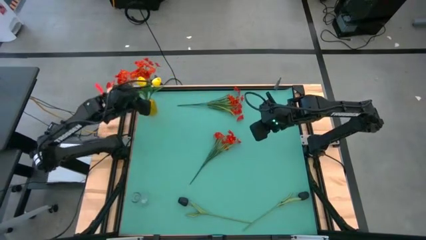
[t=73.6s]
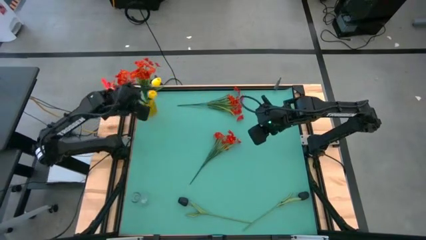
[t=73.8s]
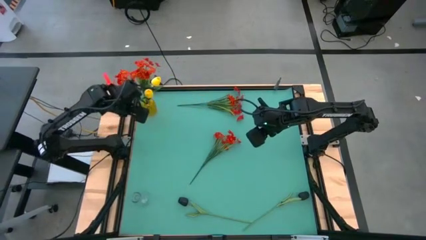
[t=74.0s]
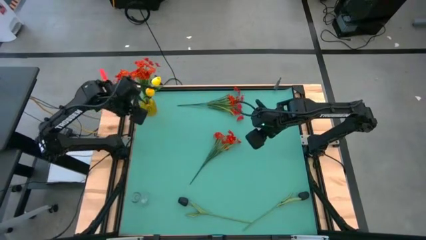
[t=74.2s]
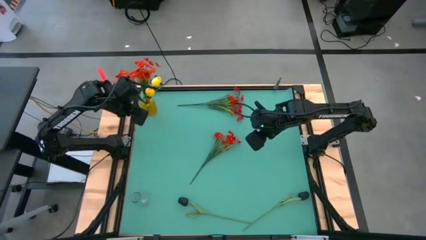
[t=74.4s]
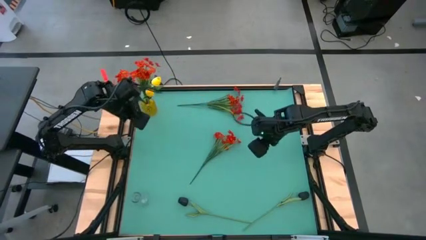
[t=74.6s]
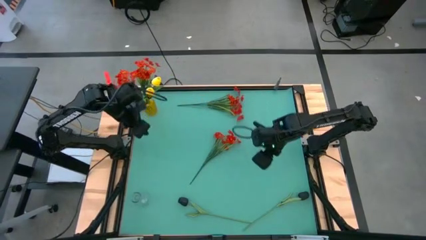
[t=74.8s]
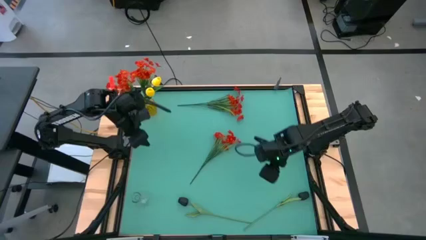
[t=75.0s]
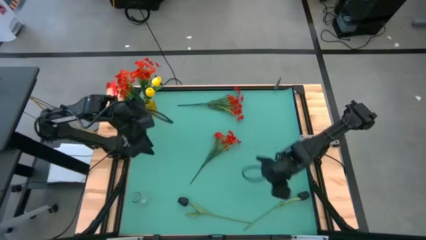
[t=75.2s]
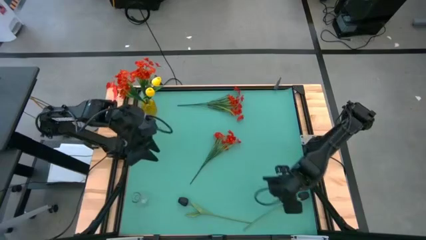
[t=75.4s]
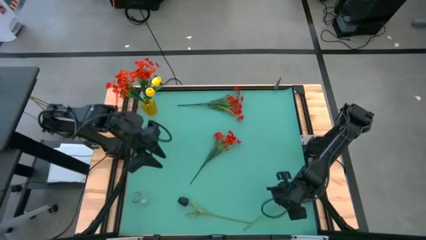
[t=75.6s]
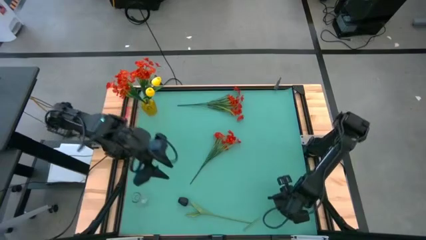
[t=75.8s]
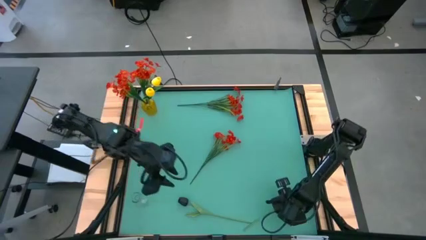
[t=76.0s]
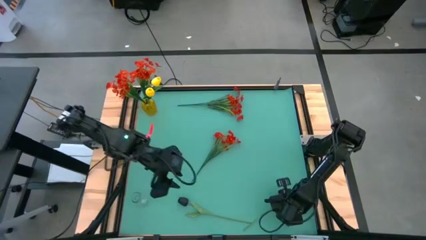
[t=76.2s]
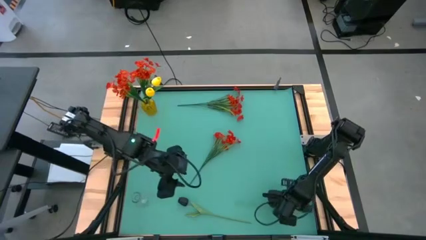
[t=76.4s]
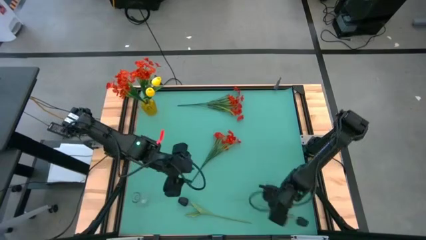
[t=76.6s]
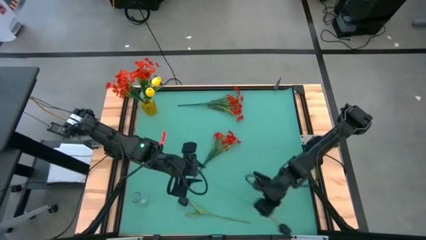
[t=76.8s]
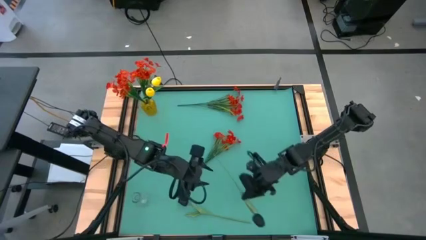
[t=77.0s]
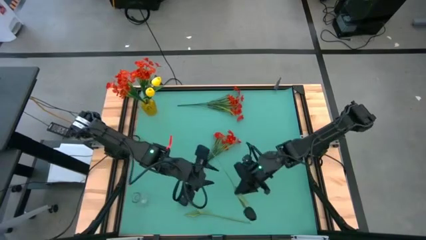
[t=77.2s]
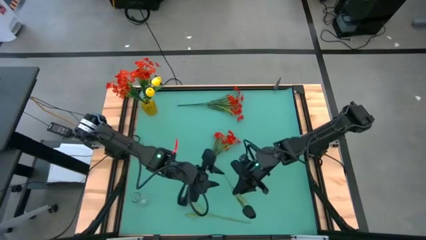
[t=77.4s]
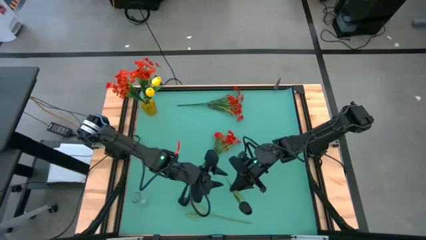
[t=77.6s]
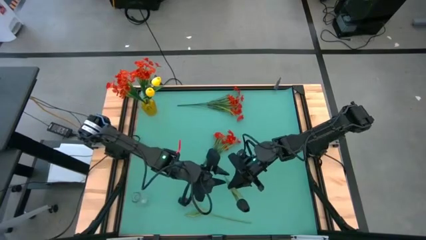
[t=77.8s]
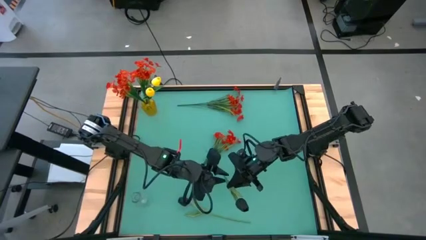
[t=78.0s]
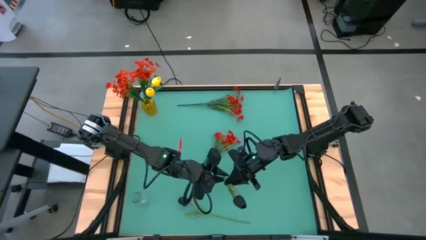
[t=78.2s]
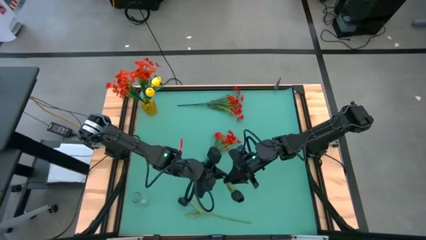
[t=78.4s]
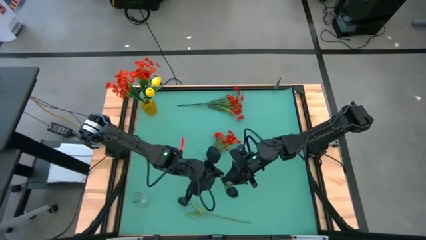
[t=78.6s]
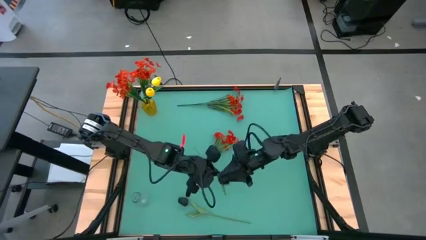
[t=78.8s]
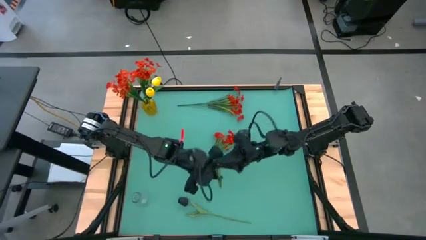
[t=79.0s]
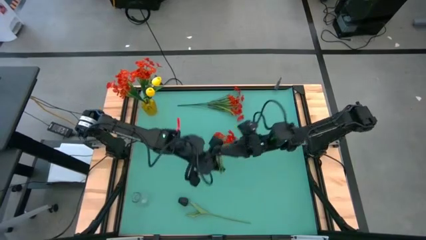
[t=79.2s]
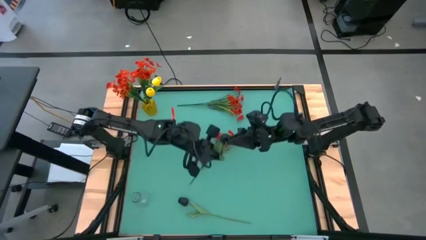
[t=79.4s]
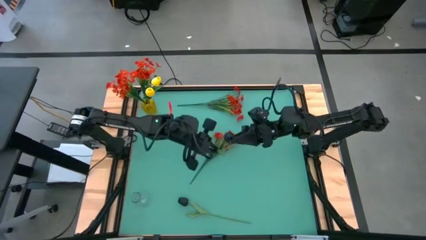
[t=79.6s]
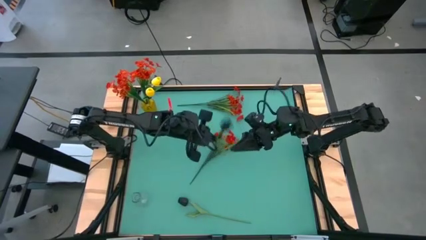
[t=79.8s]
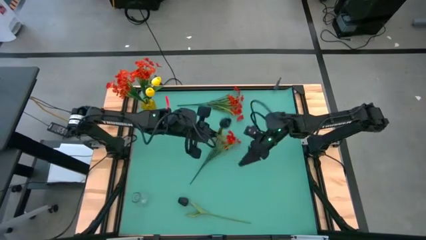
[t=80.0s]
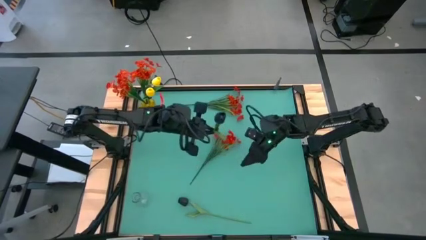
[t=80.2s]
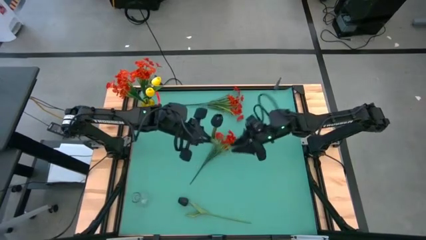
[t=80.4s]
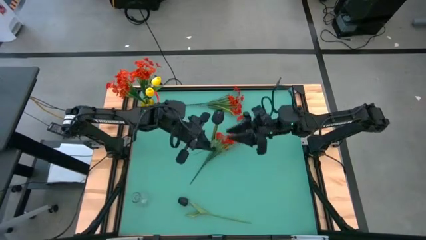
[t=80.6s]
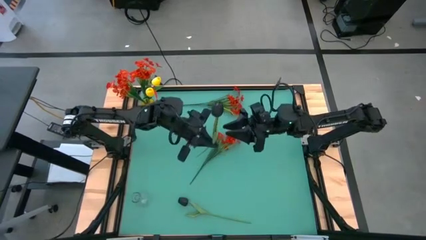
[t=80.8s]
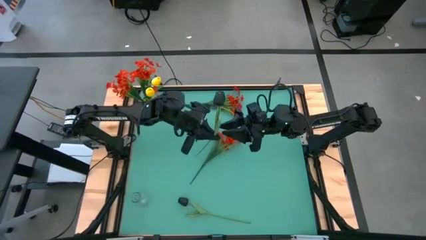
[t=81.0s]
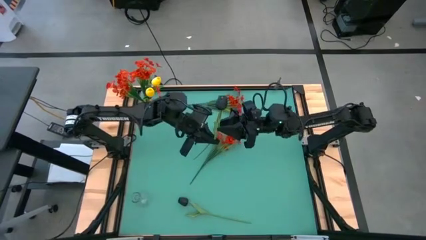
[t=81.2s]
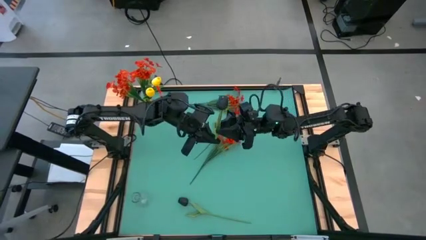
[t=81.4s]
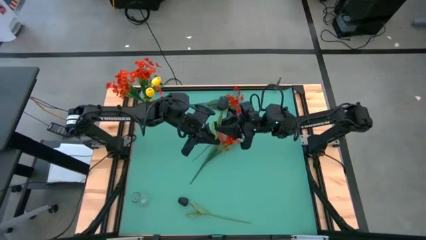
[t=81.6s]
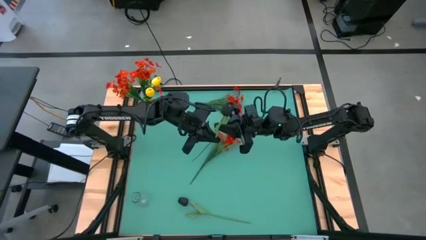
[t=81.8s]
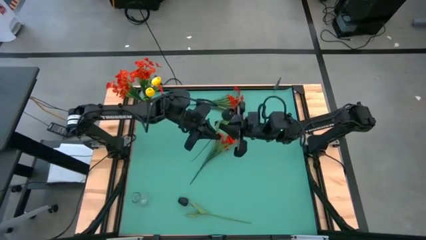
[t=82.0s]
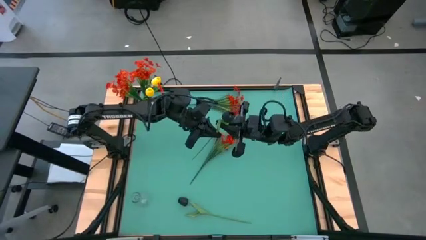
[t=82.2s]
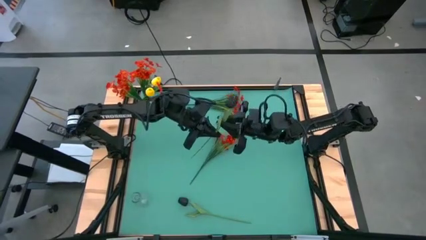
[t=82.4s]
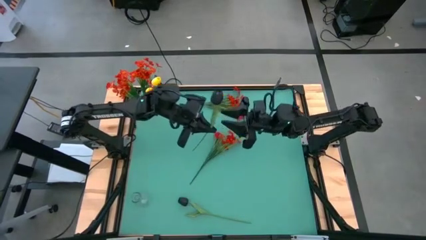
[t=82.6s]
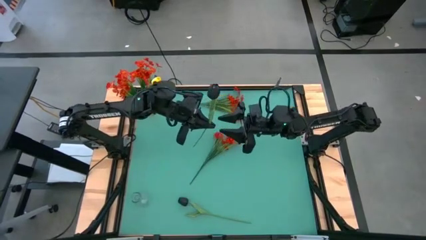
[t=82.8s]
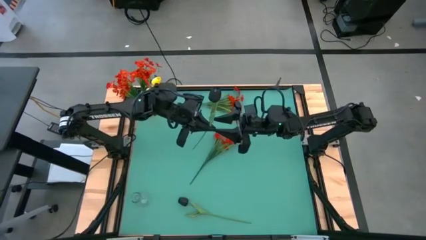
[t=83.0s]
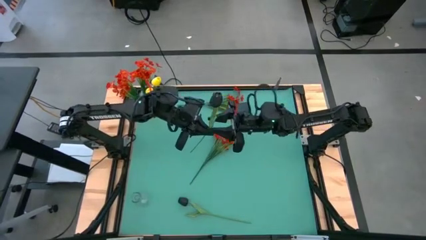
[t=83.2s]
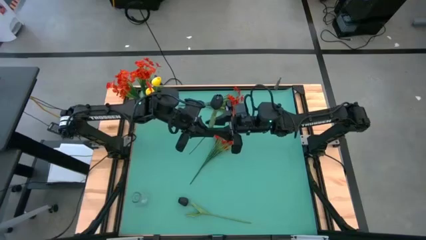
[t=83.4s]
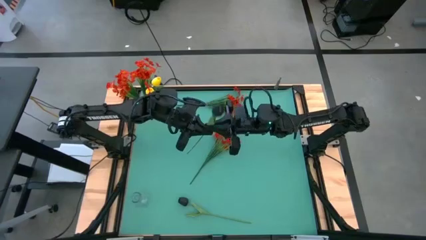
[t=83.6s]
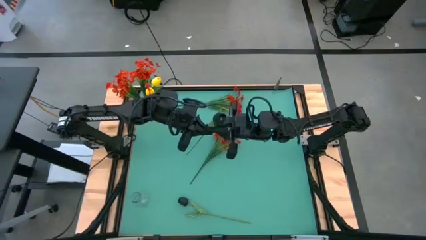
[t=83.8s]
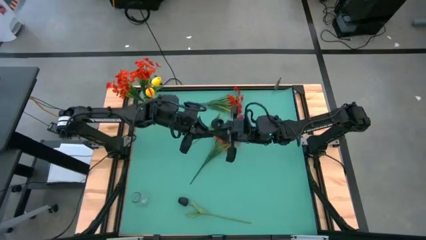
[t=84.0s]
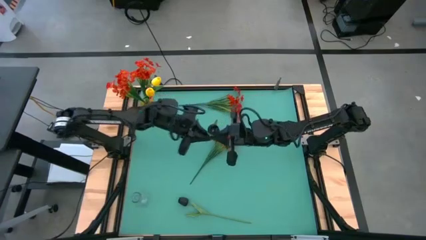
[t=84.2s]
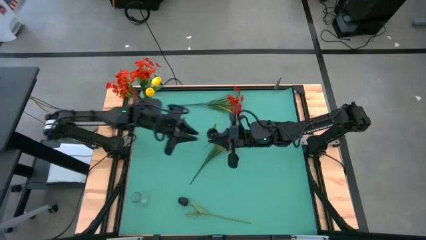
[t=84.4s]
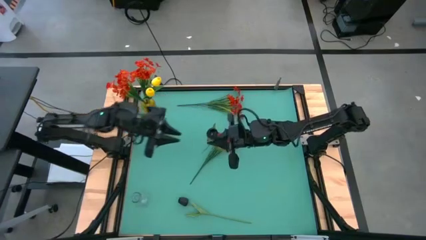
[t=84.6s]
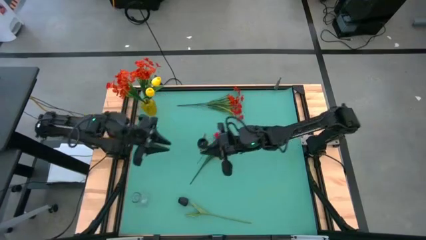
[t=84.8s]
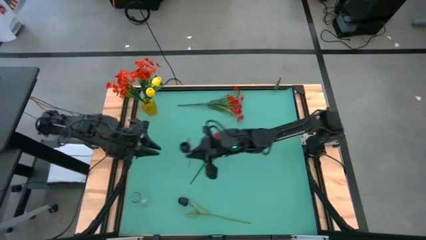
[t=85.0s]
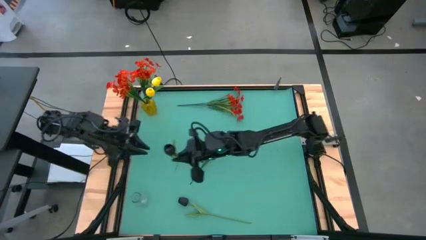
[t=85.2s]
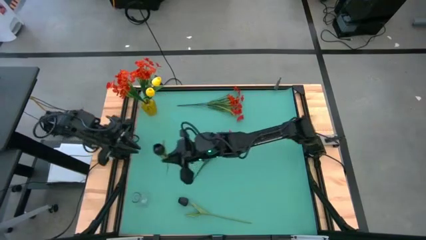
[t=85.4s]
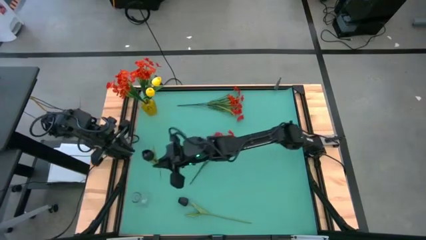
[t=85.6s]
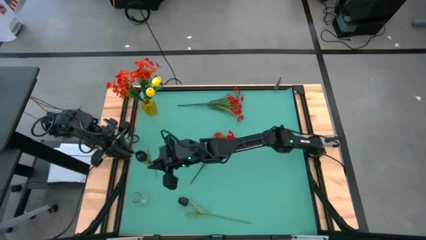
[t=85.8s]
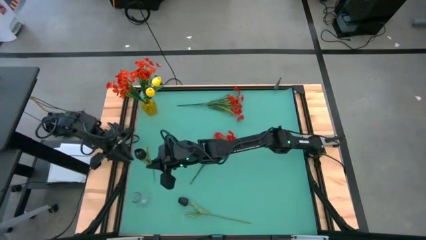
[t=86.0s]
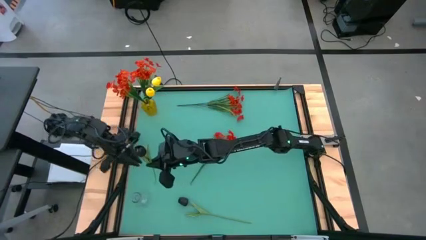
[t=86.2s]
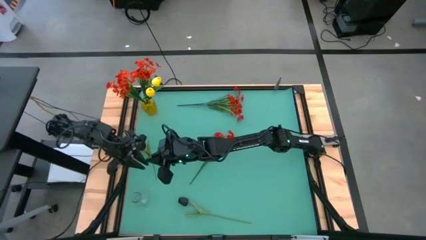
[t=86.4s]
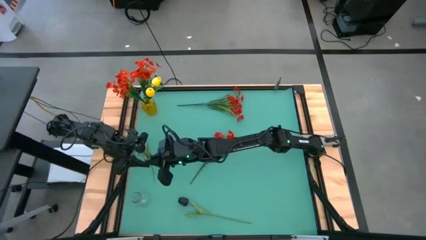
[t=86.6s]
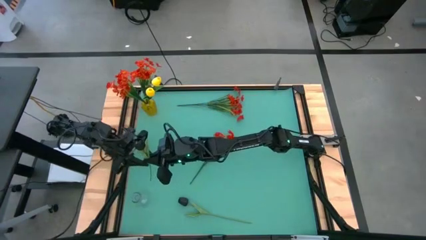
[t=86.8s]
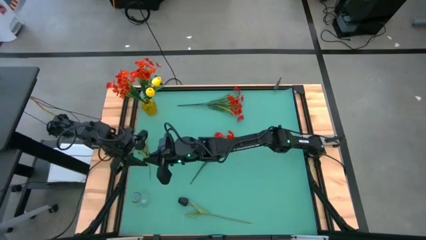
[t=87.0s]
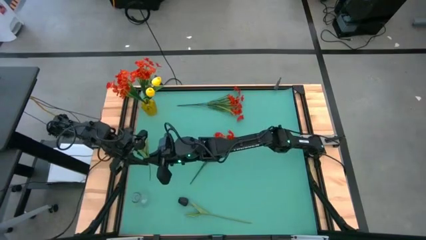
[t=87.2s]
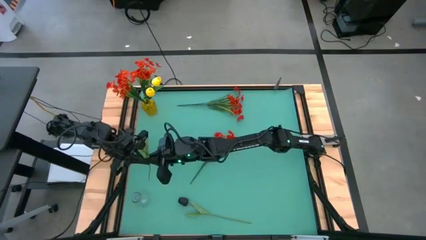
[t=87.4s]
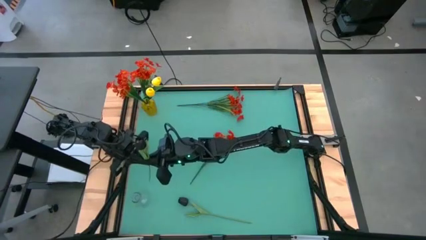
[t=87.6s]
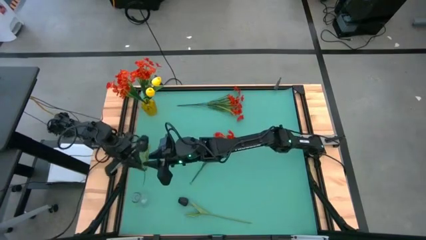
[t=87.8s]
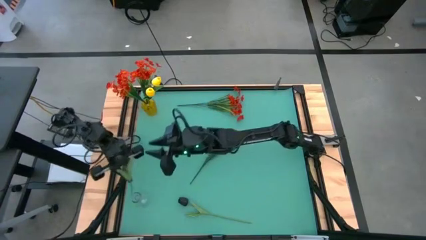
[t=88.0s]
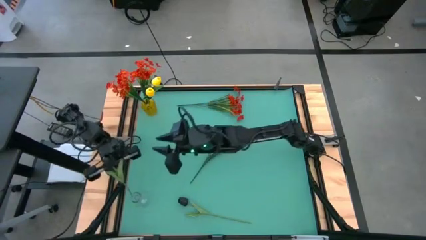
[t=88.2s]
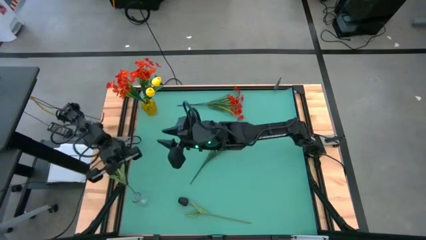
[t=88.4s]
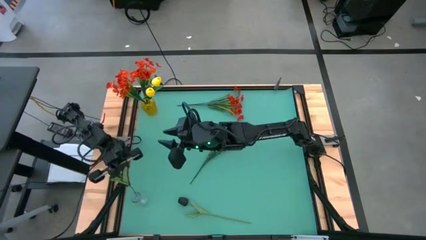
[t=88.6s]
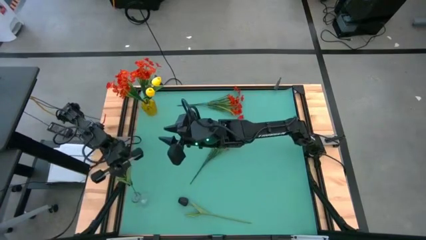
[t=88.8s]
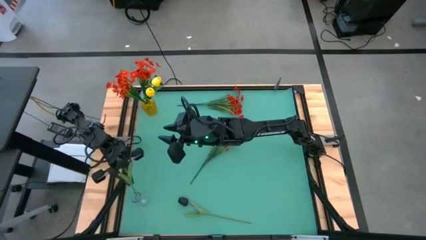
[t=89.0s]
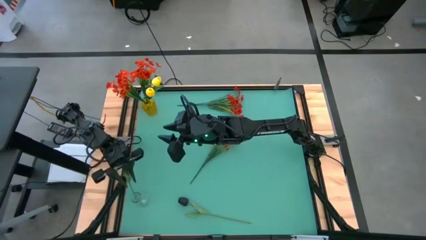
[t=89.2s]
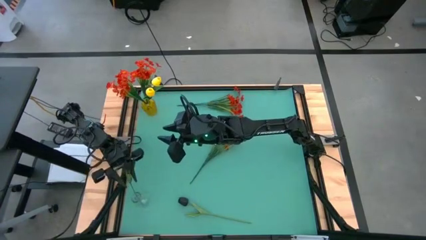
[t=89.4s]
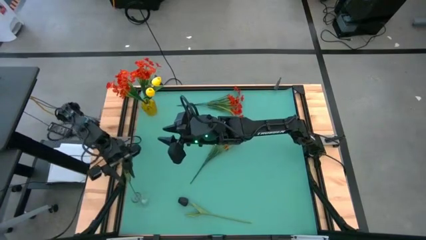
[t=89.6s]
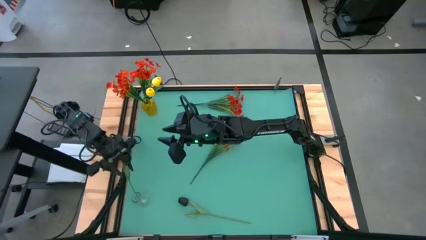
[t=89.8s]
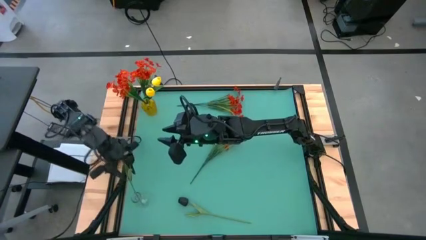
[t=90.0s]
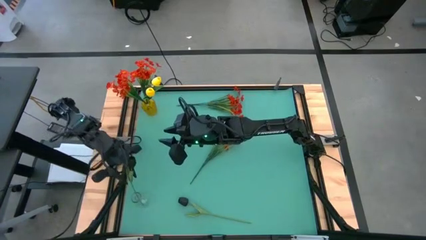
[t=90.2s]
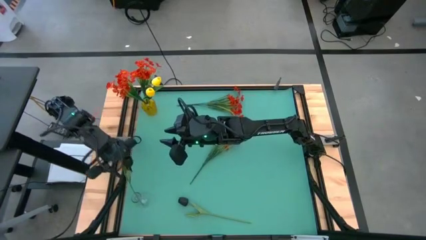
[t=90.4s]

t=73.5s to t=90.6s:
Task: Sort flowers into vase by color
Put the black flower into the transparent vase
